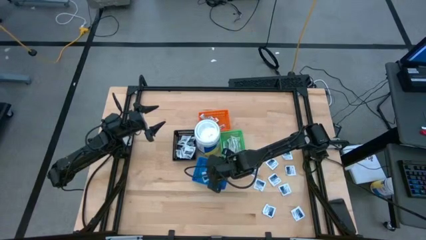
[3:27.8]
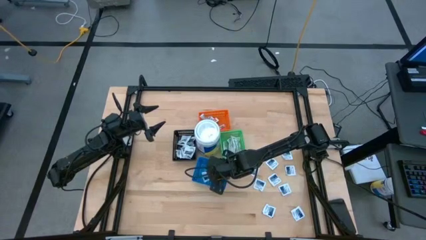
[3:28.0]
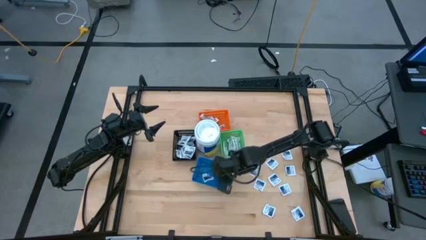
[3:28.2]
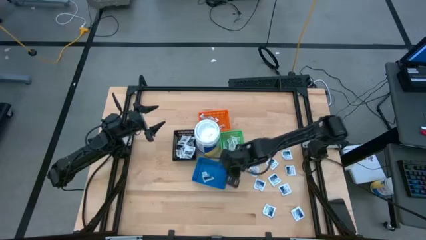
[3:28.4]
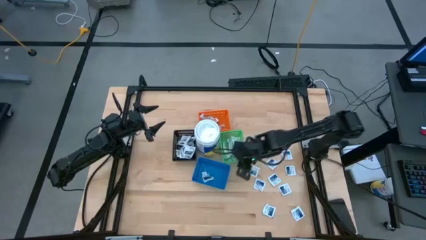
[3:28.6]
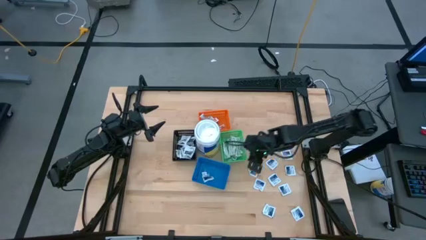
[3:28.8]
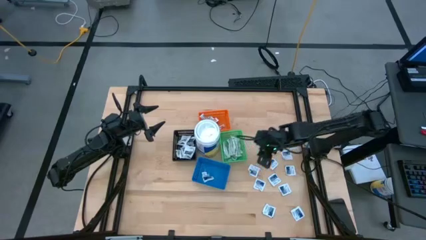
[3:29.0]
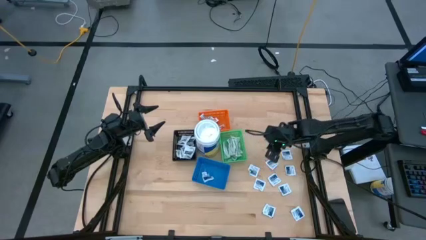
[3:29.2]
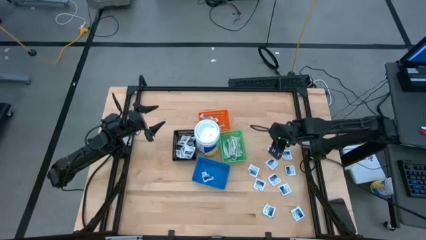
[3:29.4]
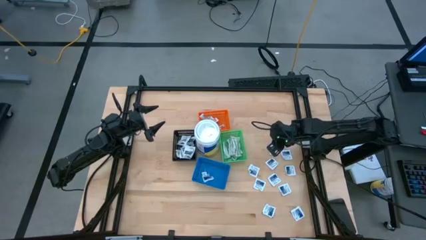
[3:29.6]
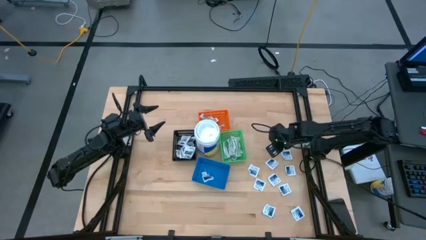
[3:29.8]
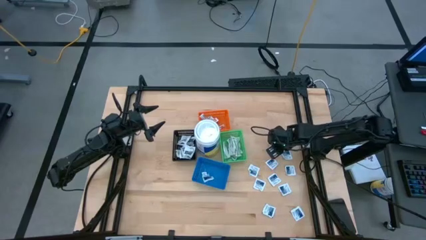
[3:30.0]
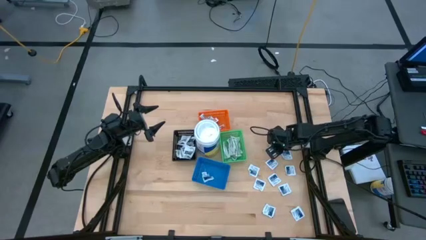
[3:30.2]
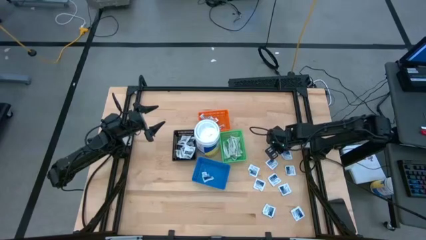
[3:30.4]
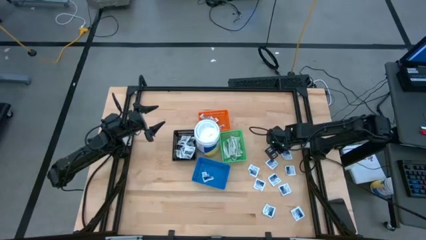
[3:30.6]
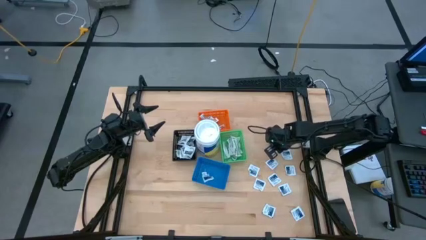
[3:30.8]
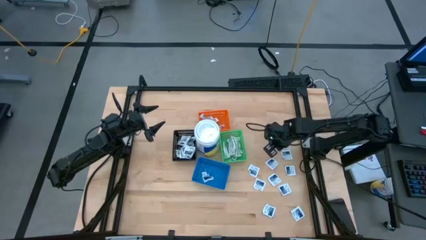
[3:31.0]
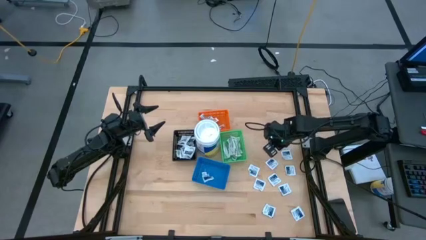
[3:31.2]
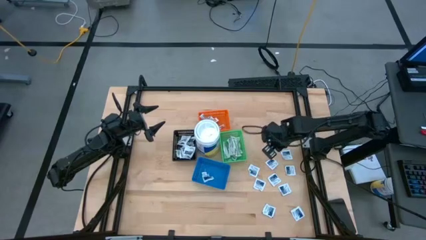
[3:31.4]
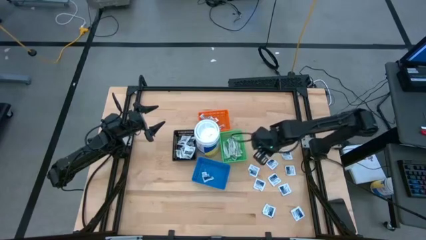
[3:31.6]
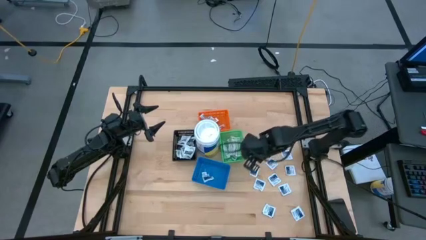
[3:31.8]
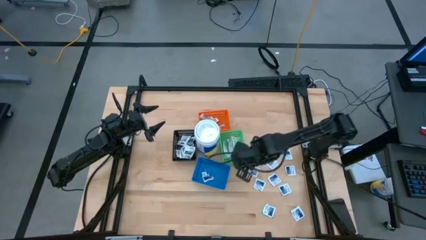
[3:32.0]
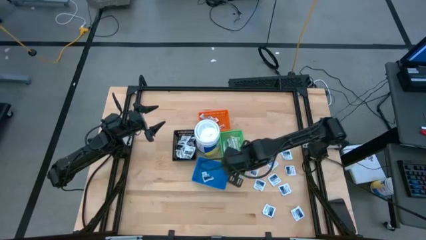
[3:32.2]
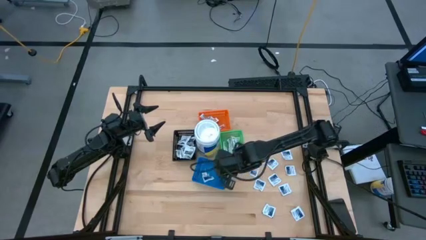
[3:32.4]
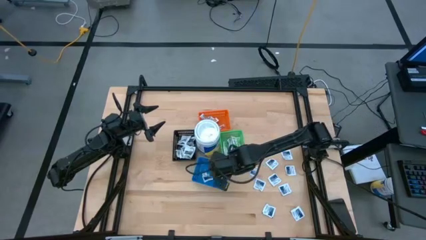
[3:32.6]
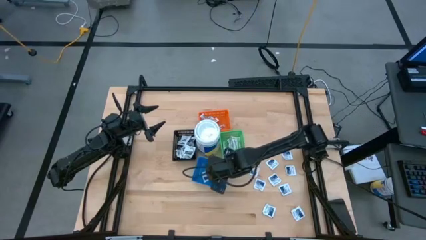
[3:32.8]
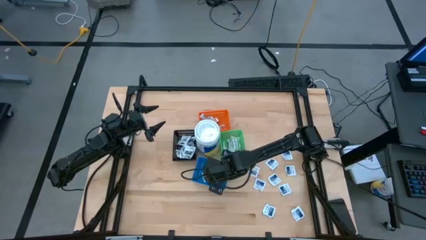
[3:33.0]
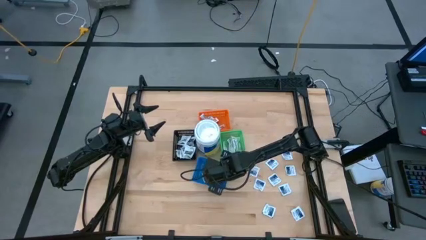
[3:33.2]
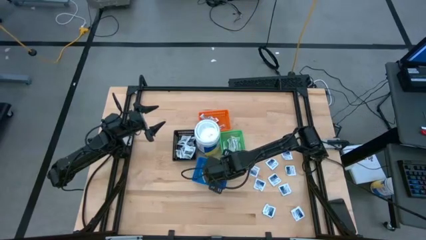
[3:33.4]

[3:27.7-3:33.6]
Task: Pick & Place First Aid Supplies
Put the blue alcohol pad into the blue bin

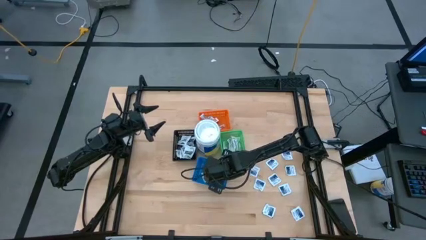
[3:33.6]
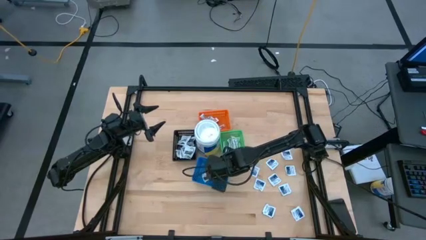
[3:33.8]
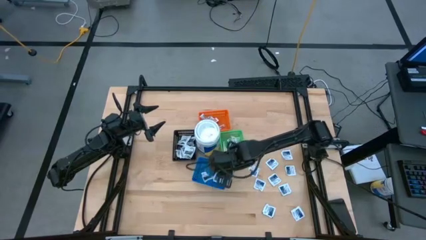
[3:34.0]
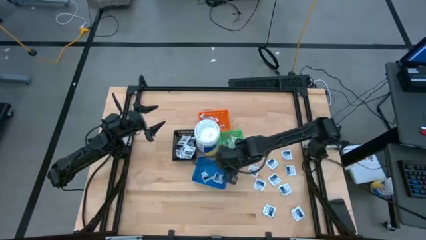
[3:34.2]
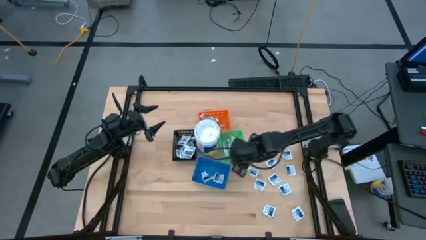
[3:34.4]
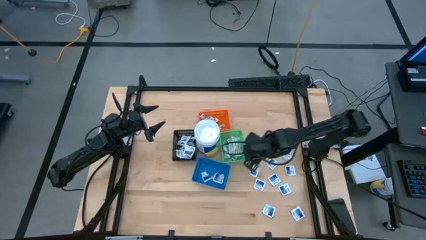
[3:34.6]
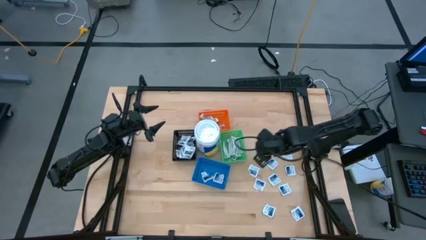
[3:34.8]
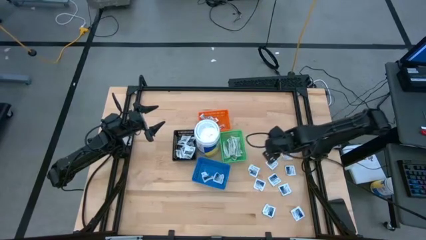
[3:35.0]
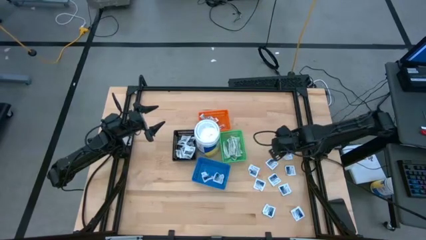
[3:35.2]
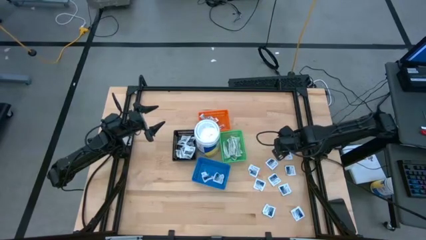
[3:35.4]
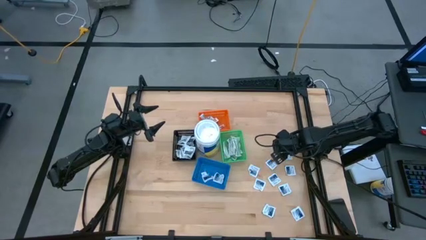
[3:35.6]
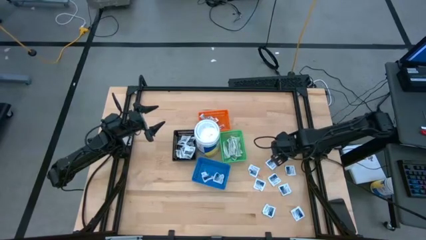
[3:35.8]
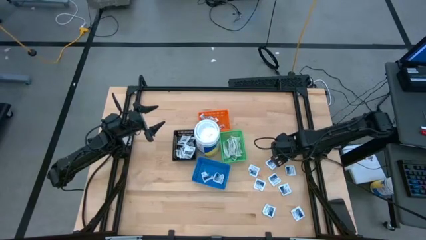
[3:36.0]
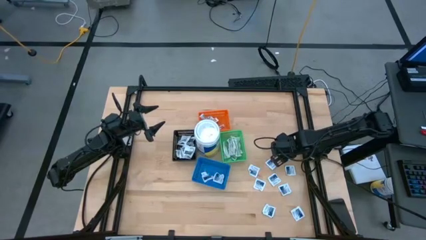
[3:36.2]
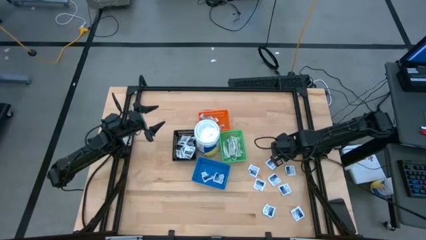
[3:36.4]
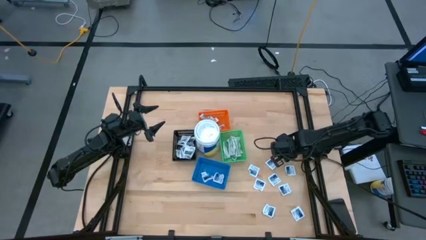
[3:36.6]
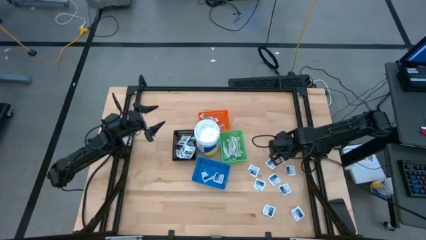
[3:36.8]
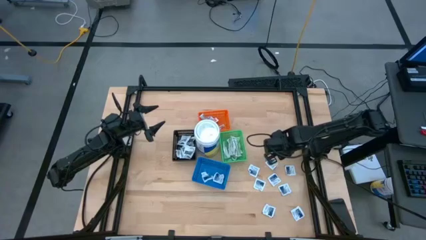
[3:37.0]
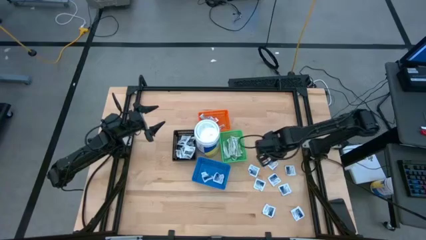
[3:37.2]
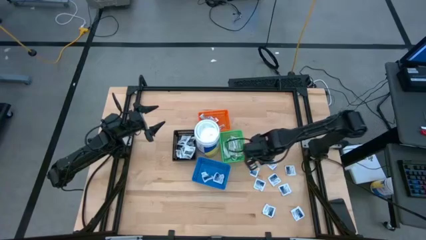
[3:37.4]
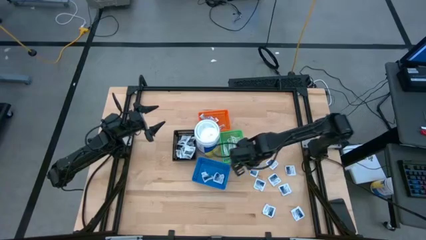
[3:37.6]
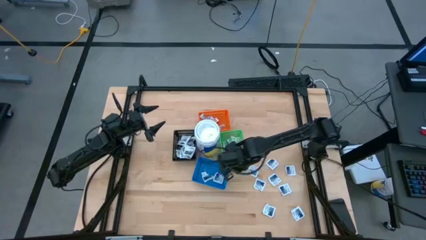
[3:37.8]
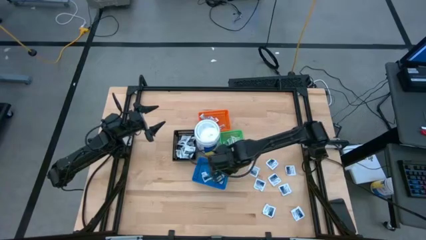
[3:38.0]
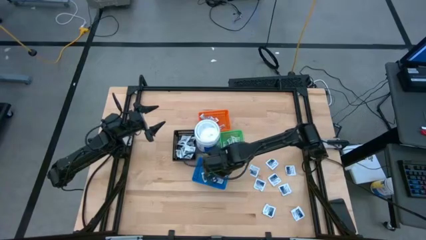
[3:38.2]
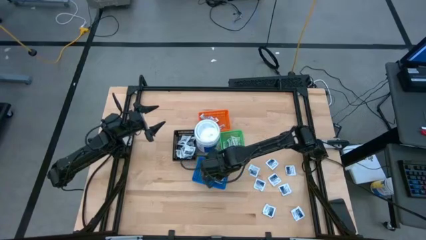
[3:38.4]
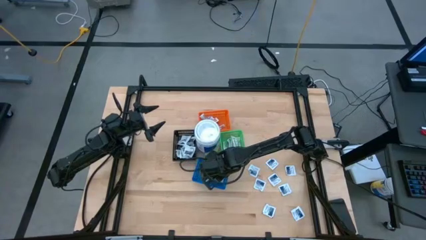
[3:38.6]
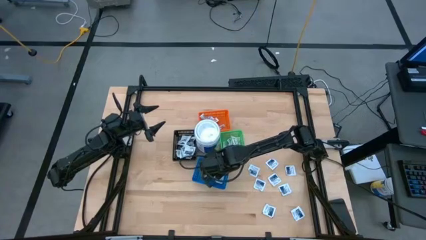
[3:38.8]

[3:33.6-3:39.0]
Put the blue alcohol pad into the blue bin

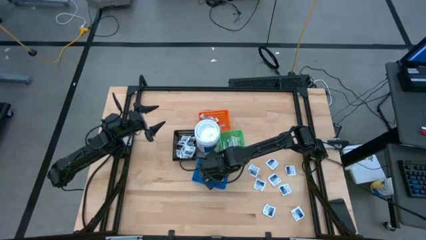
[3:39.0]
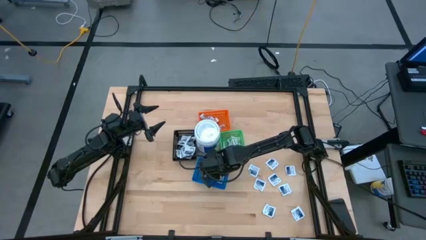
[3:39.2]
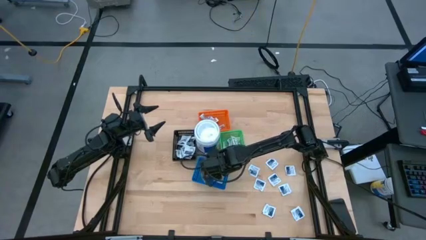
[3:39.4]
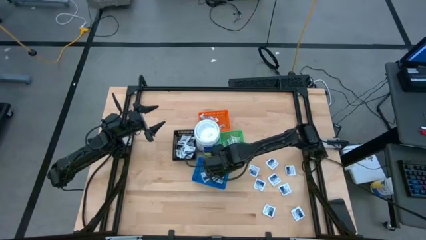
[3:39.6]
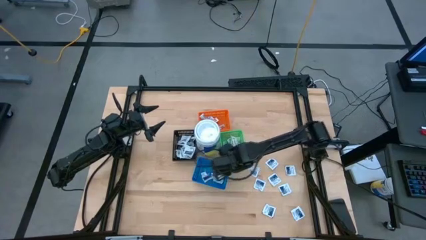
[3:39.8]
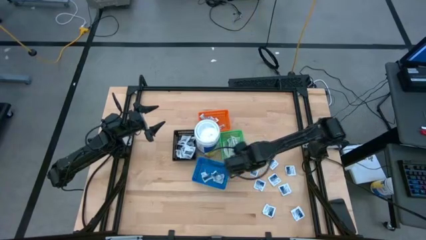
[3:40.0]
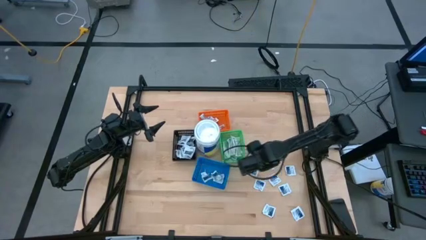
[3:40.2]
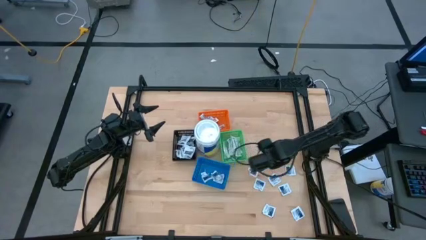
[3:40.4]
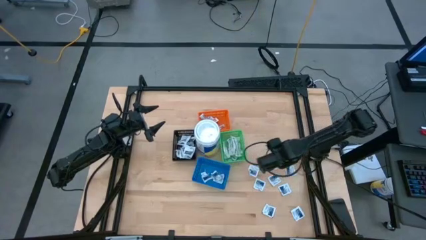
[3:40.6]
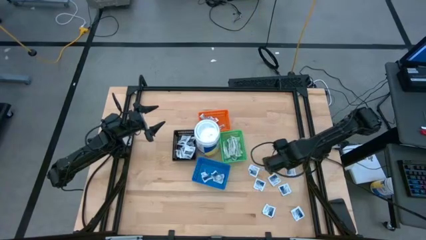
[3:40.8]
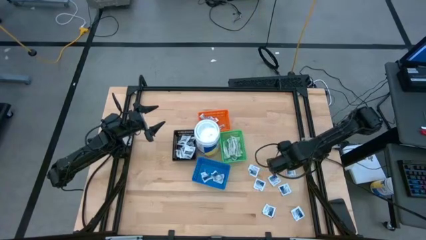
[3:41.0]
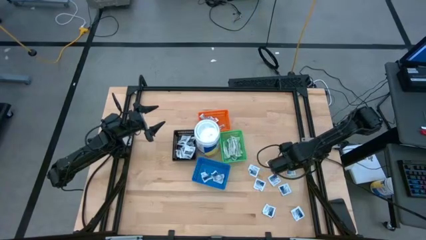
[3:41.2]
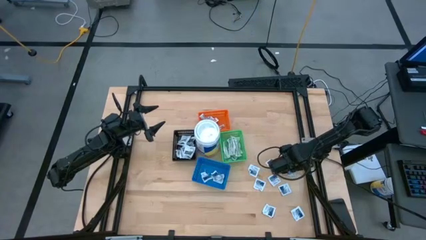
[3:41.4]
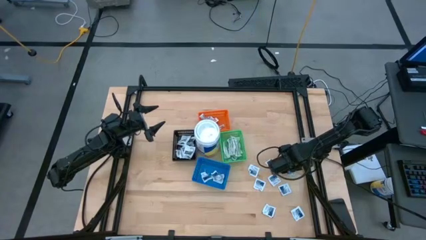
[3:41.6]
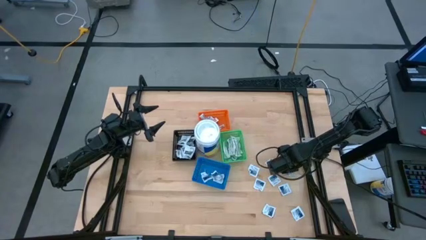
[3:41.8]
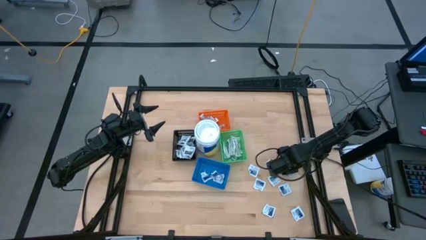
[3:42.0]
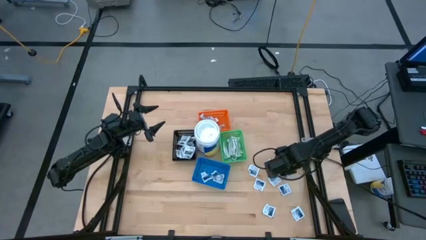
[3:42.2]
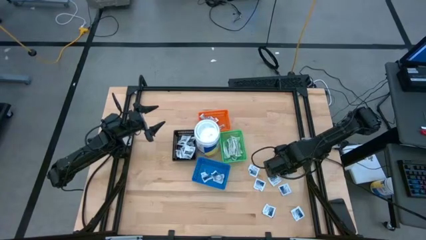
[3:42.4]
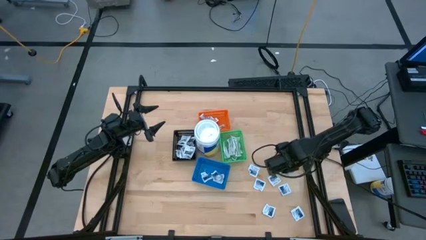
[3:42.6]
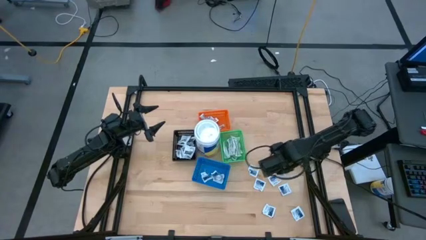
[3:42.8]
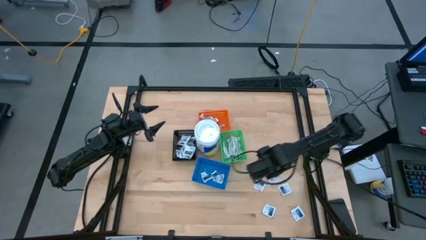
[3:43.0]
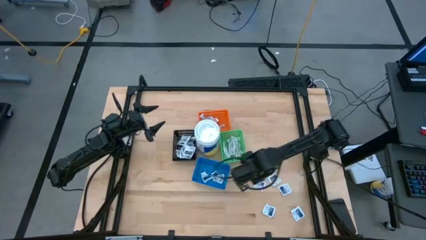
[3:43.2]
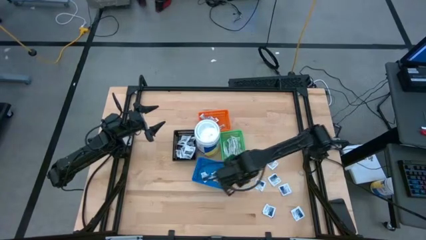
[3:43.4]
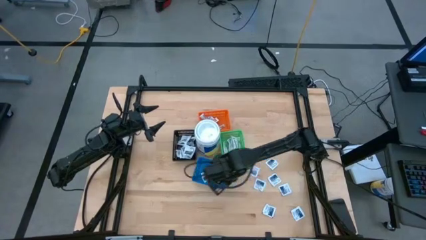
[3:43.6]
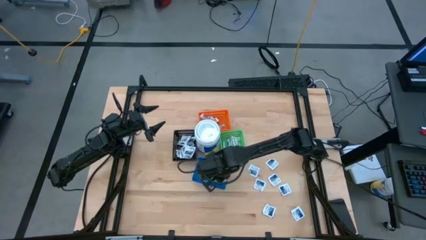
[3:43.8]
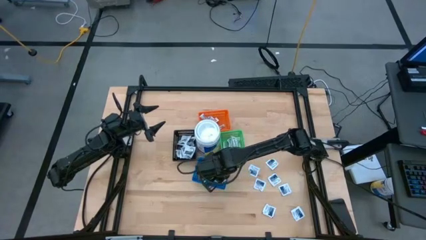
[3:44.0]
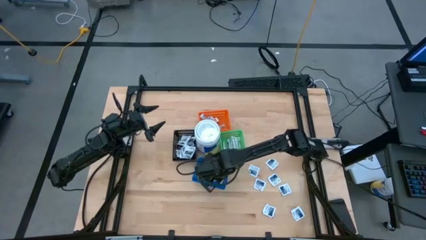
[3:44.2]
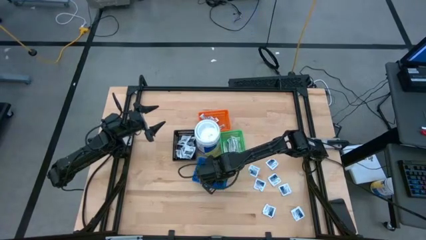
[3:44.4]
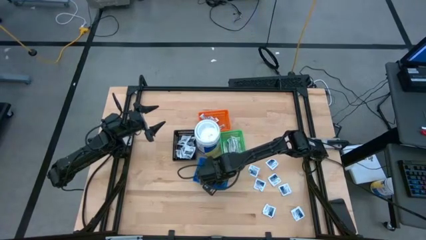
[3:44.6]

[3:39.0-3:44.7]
Put the blue alcohol pad into the blue bin
